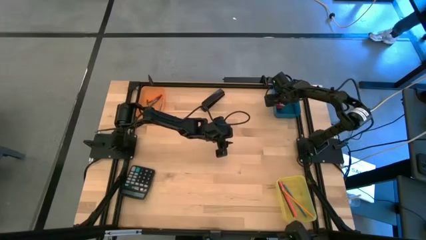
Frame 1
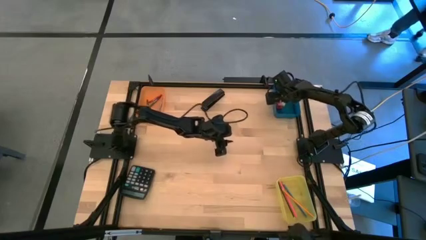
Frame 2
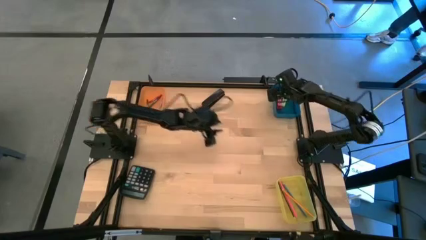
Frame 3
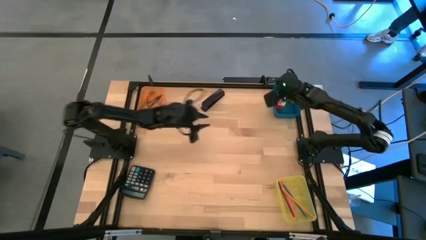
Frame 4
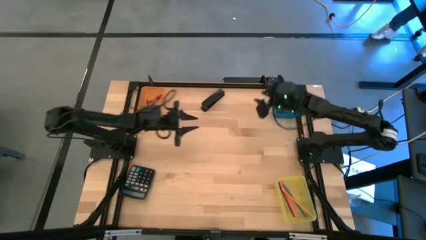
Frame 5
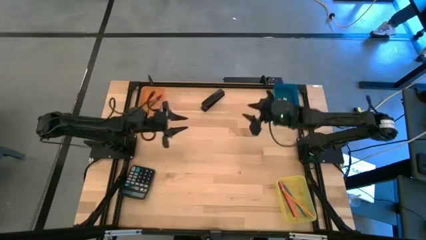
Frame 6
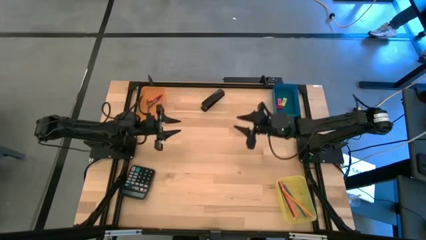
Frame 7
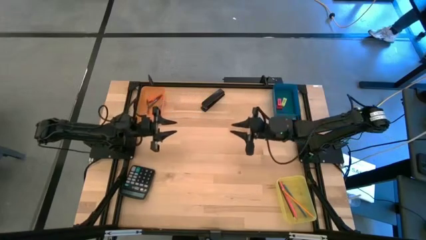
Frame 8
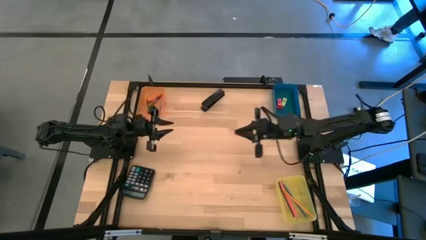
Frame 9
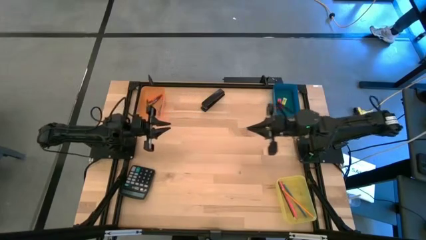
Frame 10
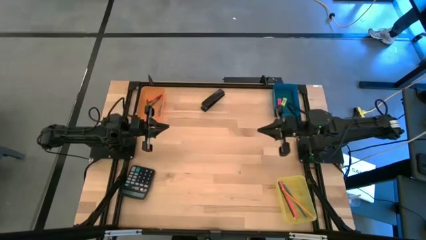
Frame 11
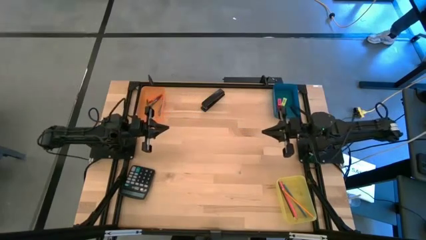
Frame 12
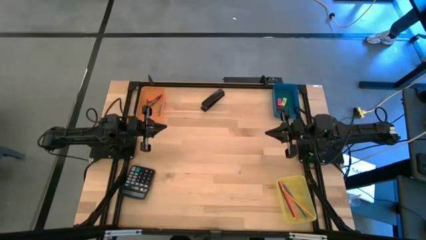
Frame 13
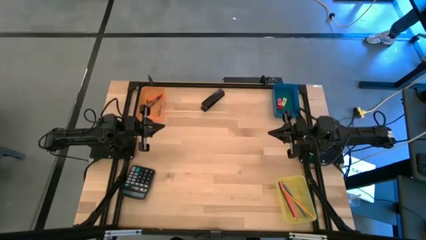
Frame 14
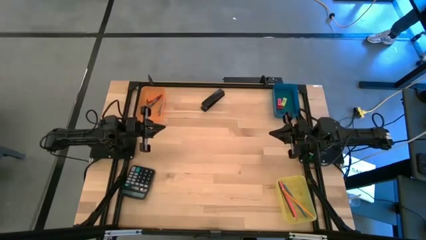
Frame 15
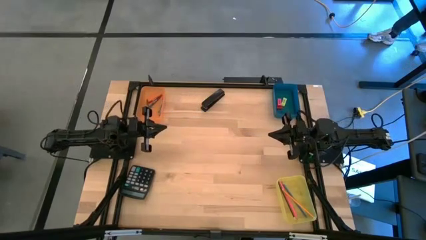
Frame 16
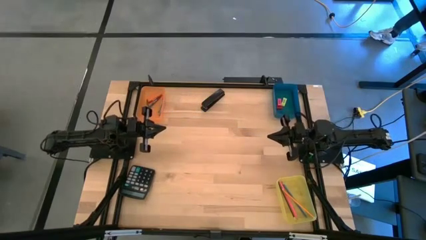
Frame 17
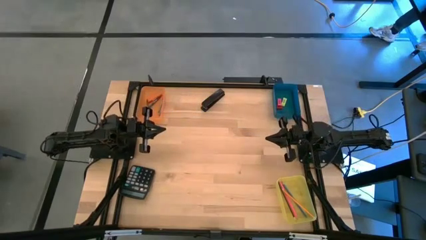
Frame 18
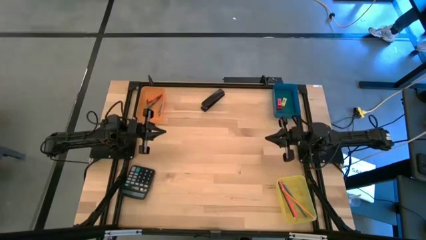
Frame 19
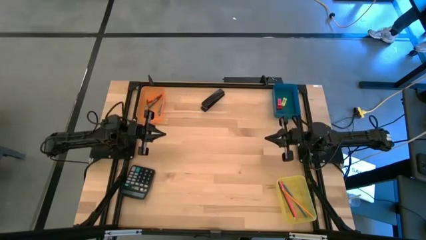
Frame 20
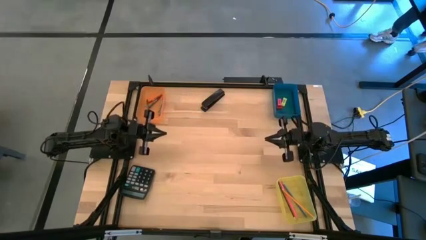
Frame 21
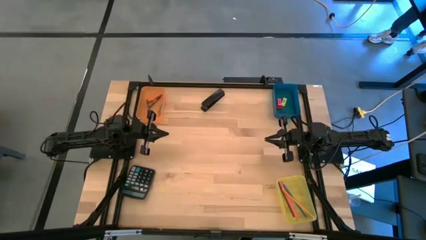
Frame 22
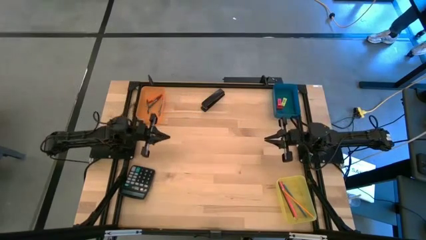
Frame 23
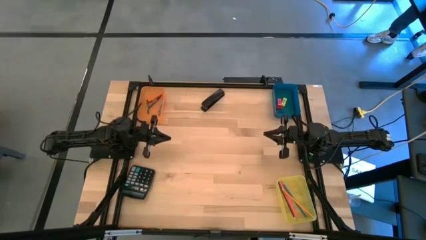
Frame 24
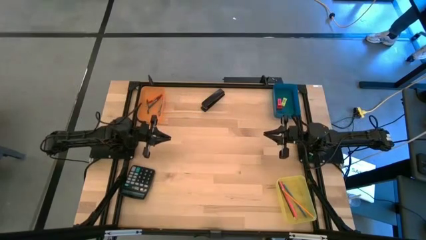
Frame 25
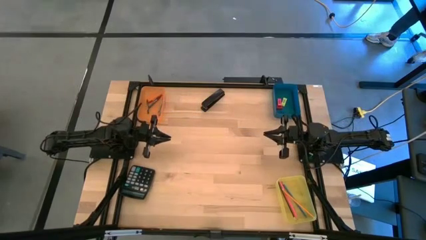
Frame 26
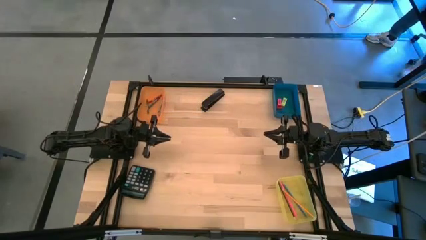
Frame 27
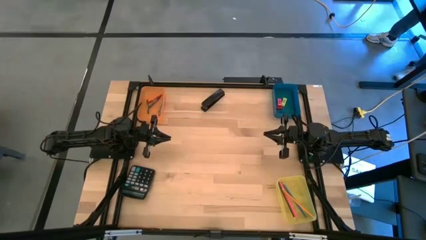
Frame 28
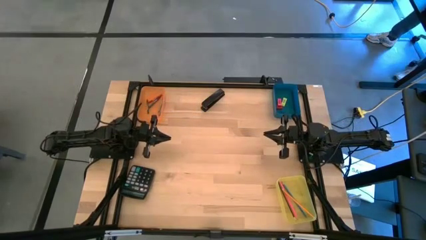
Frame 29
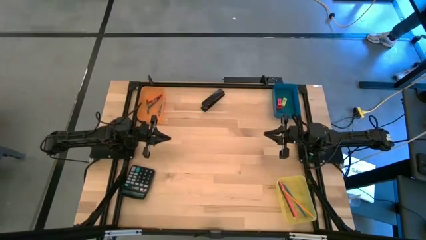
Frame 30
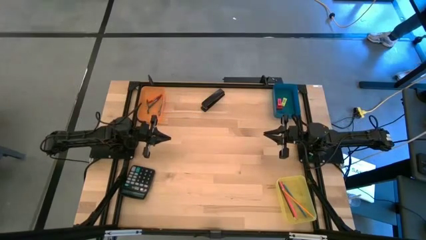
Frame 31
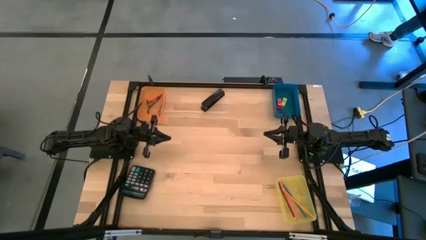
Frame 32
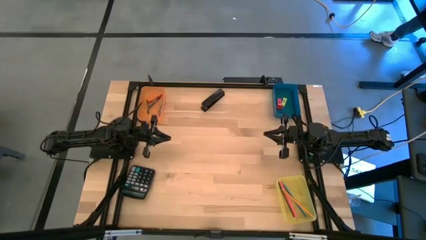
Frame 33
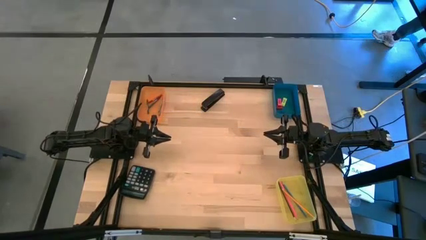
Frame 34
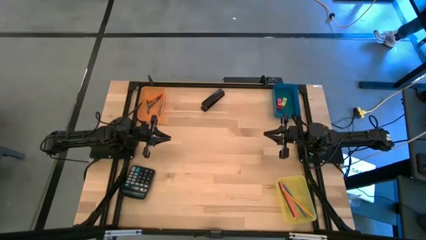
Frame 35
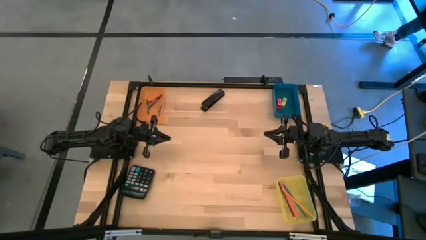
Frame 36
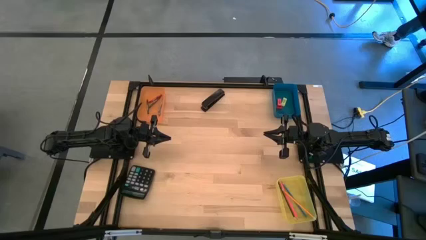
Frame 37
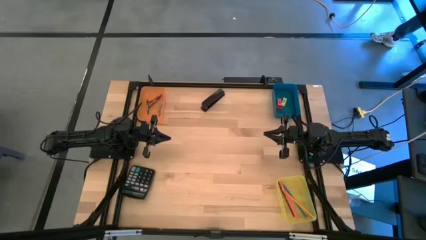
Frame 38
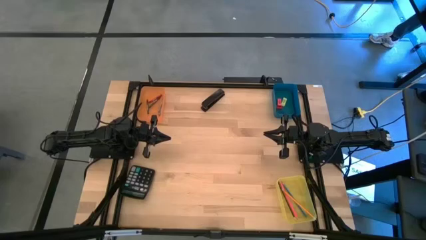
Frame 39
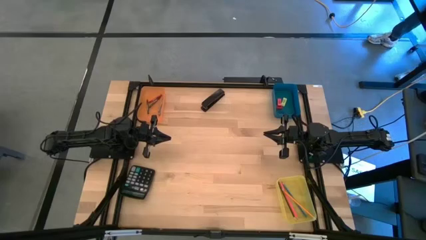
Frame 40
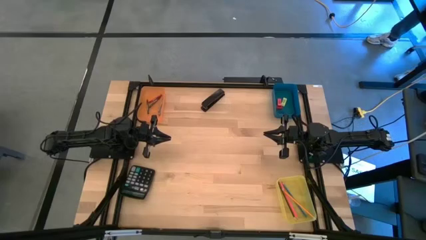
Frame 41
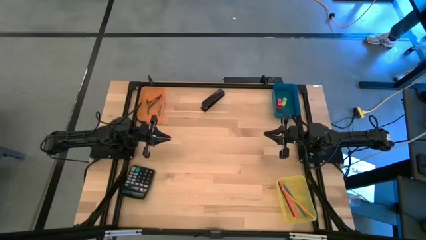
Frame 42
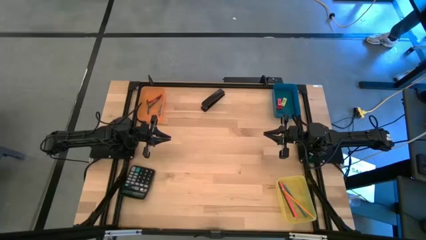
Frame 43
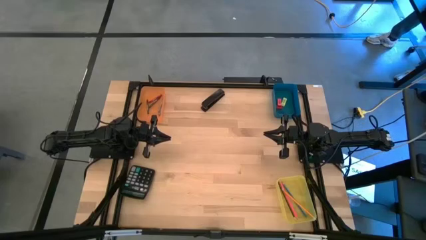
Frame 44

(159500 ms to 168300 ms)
Task: Sort crayons/erasers/pens/pencils in bins
Return to Home Position

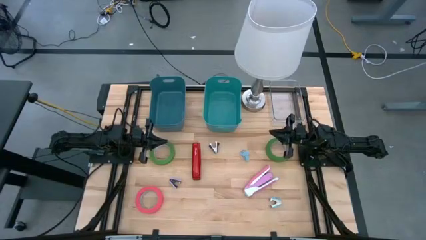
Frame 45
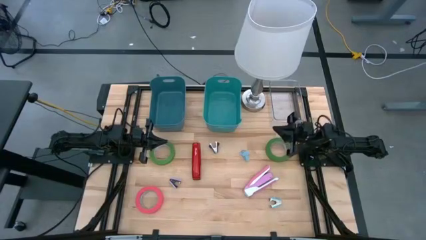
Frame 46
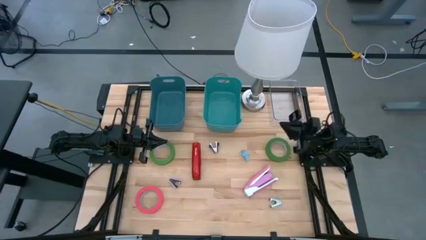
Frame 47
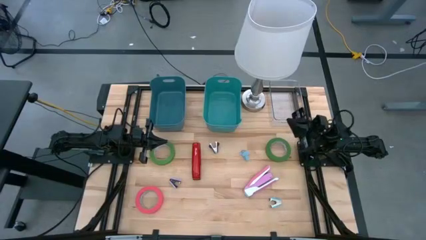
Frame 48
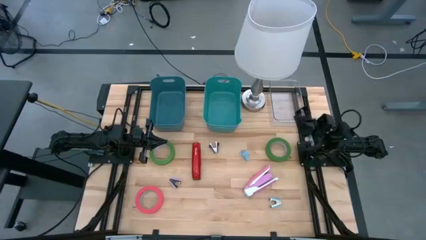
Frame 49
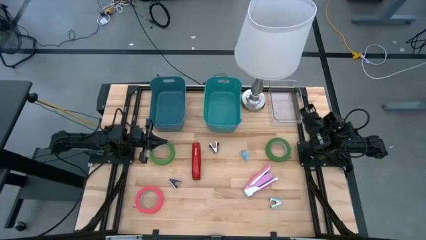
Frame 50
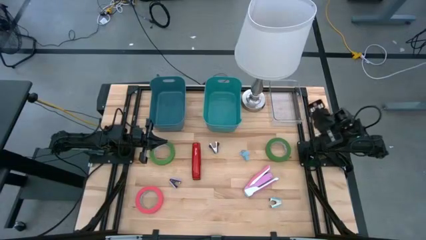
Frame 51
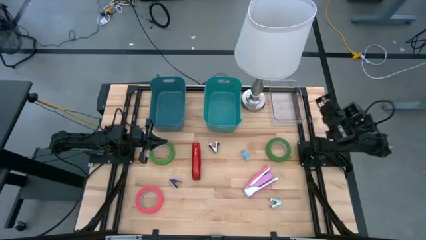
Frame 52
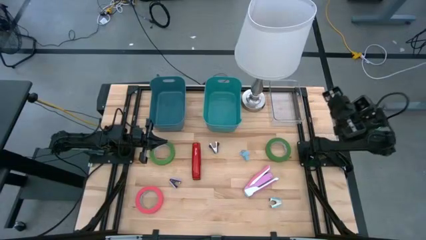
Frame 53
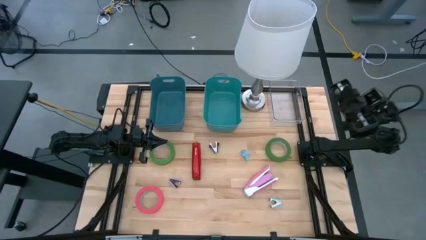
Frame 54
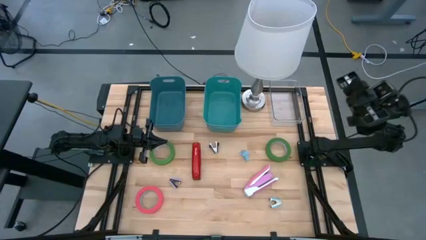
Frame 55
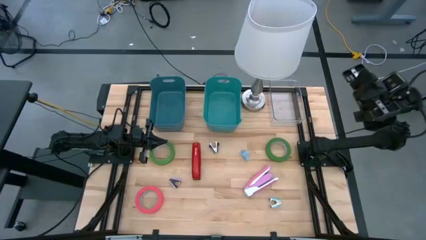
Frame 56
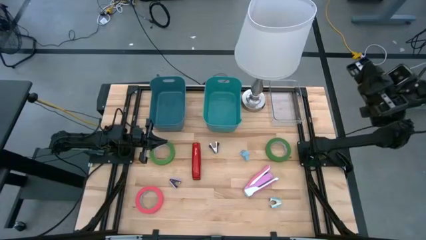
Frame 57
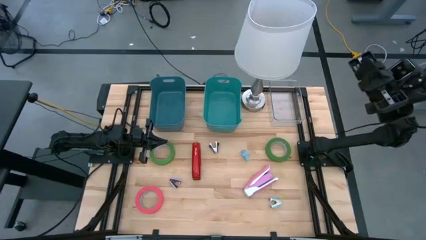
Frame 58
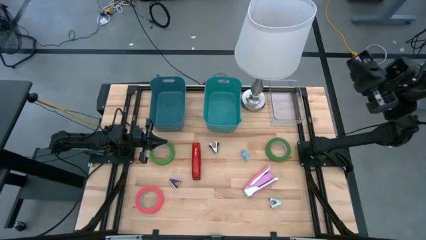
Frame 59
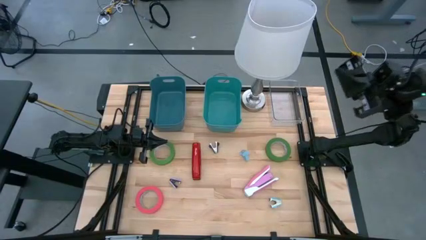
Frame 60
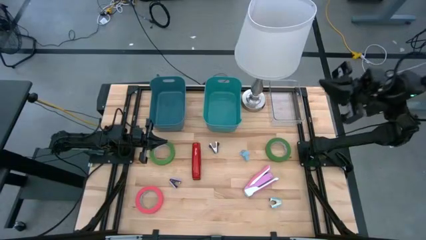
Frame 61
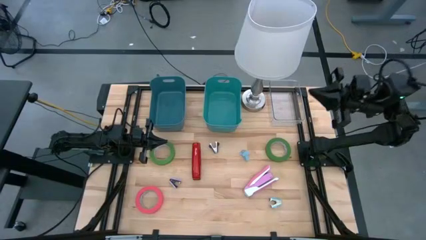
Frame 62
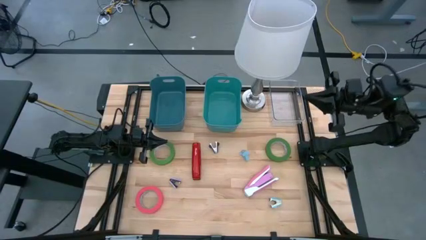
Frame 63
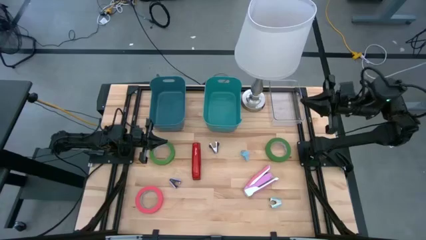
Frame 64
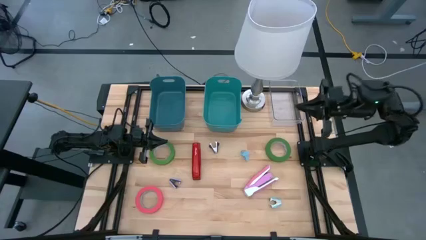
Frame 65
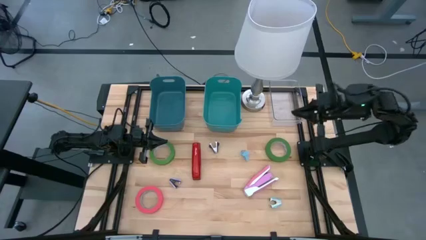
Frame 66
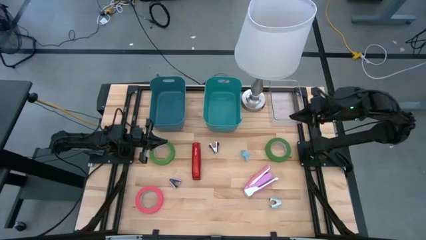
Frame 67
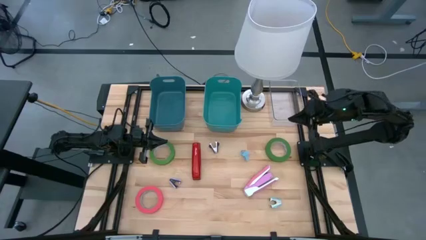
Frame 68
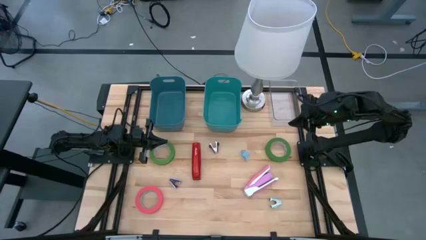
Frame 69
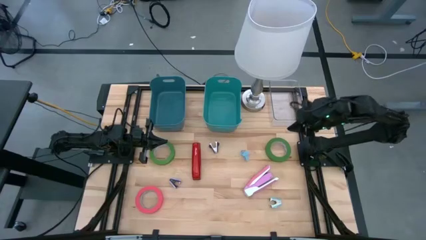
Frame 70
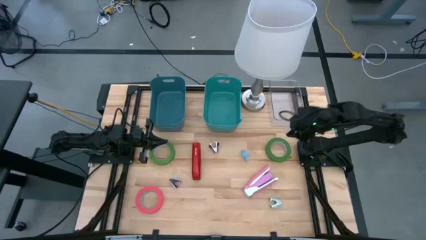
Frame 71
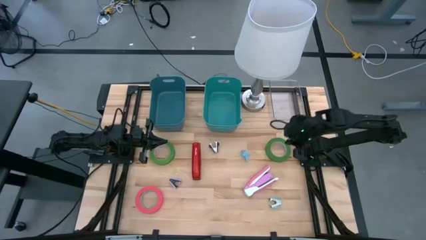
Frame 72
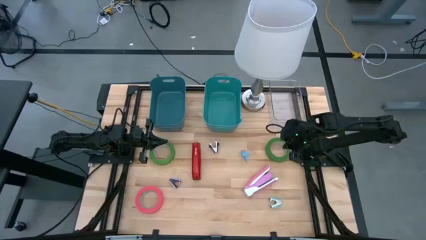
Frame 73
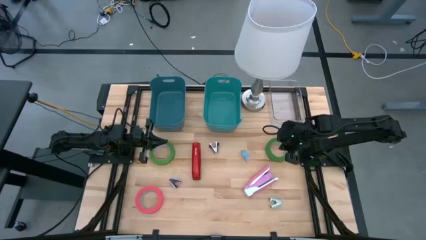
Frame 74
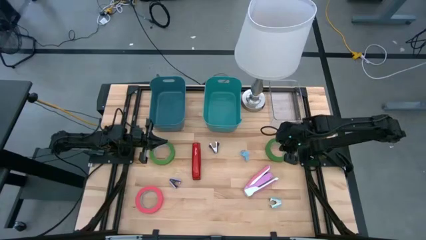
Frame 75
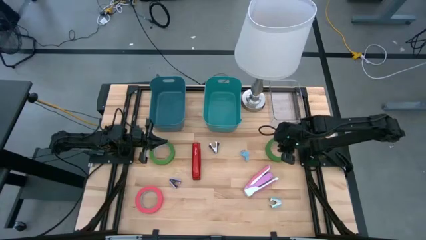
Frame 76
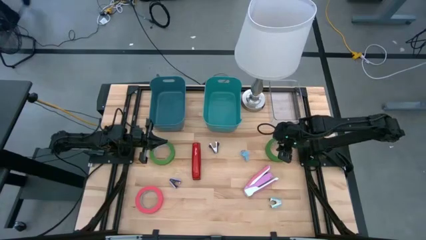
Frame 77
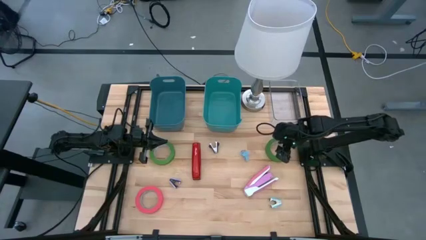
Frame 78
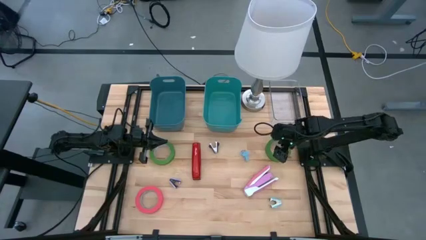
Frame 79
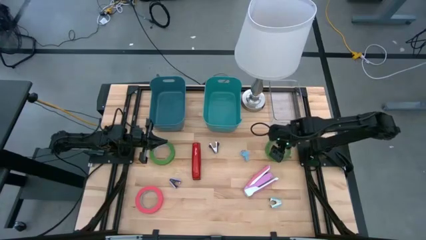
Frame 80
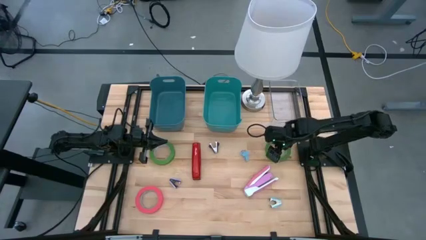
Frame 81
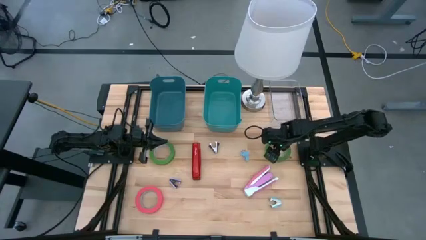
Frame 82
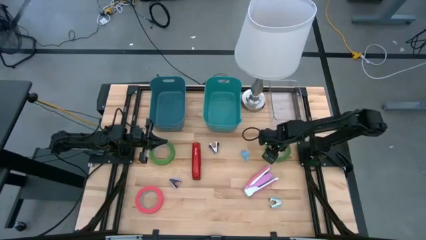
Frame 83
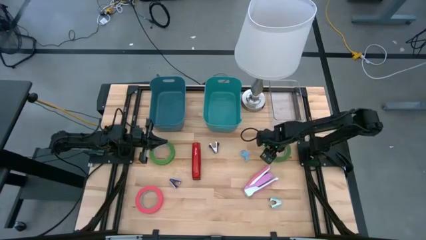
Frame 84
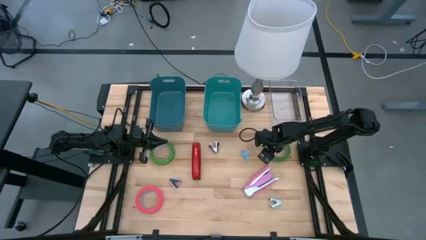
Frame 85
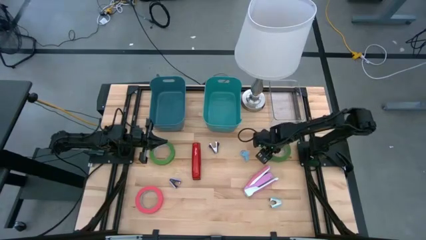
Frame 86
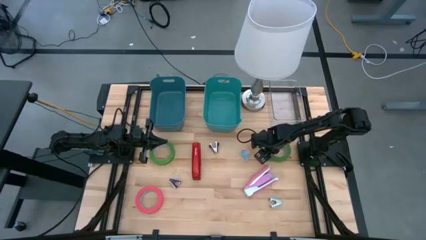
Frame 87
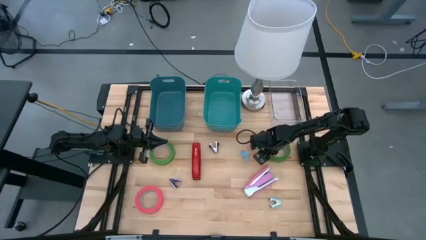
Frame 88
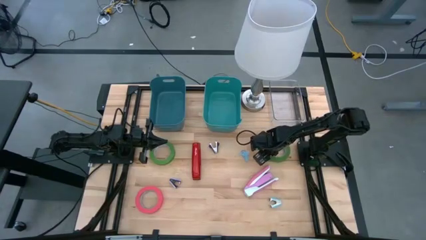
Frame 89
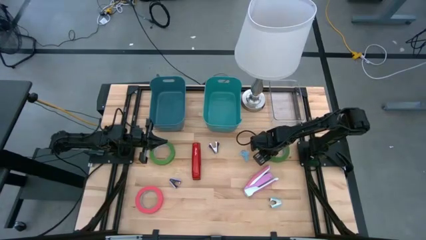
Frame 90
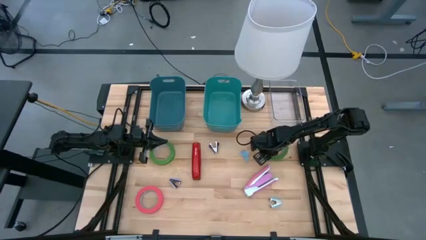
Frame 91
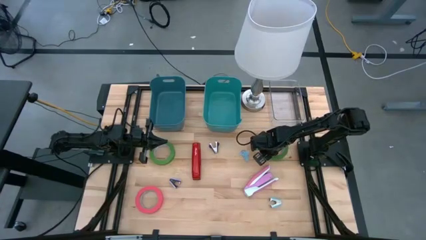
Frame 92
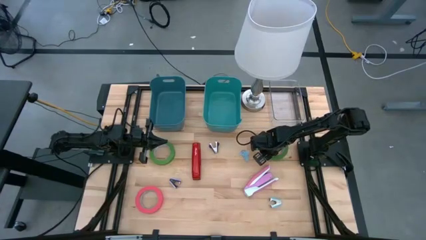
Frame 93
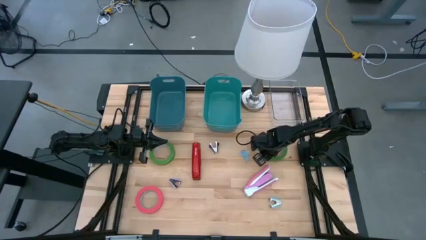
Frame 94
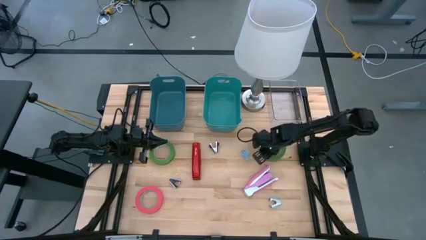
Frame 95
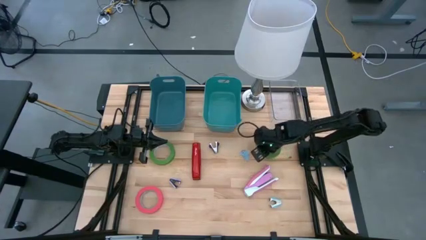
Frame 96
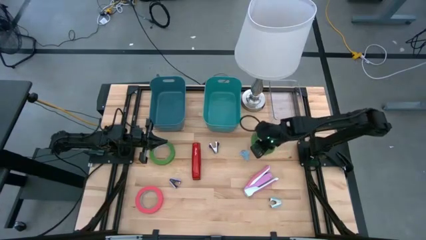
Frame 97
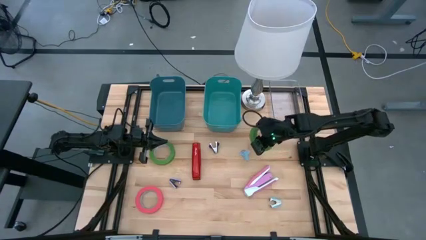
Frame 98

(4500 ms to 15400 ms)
Task: Pick and place Stapler, Stapler remover, tape
Put the green tape into the green bin
